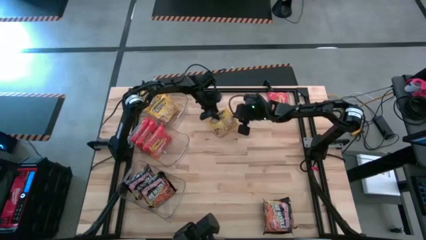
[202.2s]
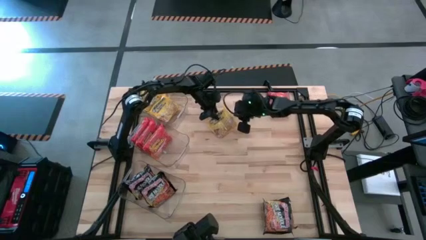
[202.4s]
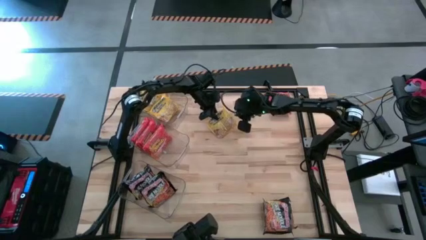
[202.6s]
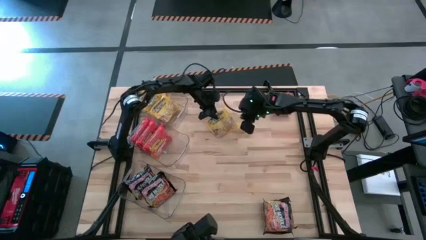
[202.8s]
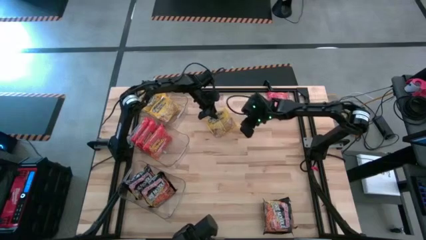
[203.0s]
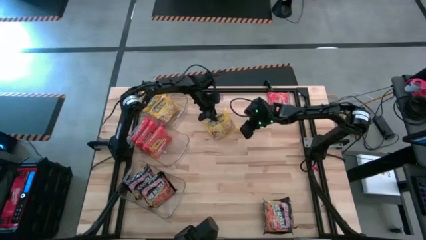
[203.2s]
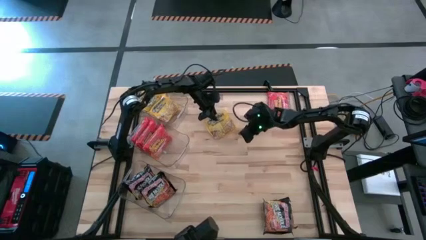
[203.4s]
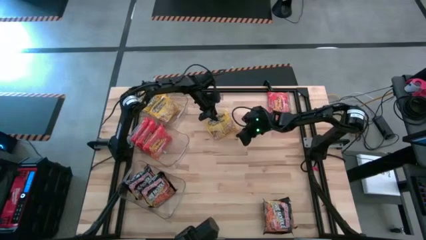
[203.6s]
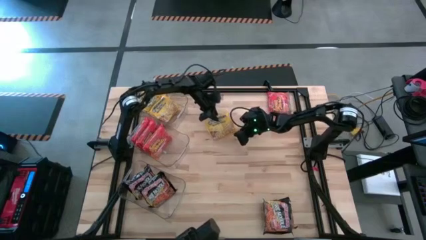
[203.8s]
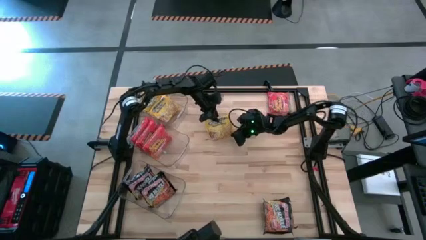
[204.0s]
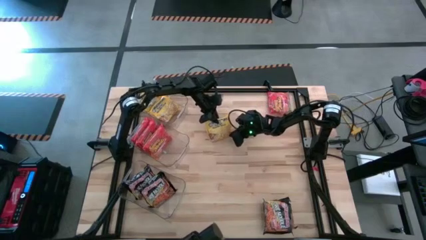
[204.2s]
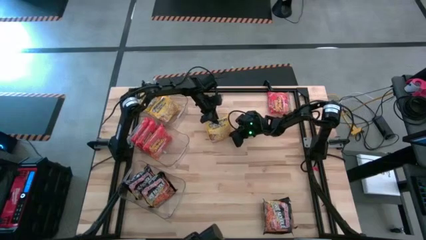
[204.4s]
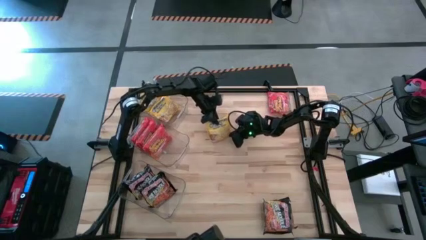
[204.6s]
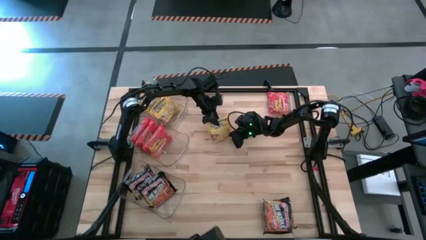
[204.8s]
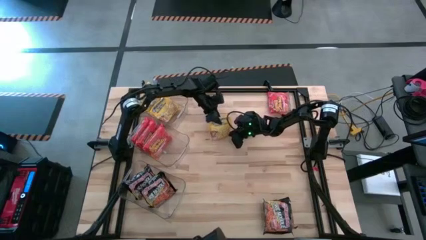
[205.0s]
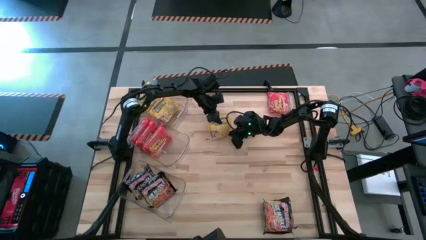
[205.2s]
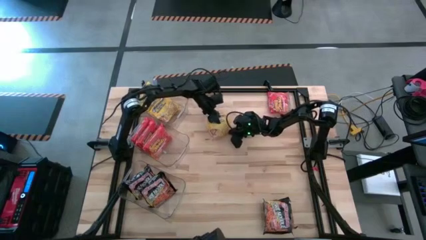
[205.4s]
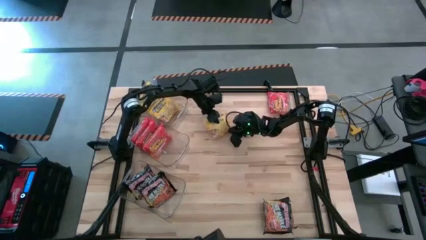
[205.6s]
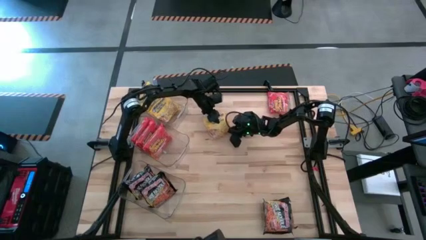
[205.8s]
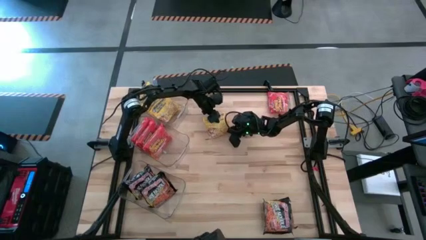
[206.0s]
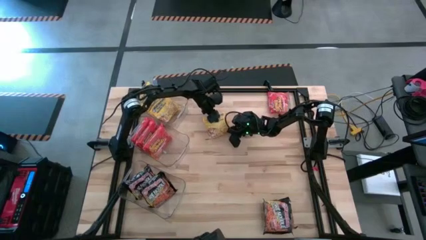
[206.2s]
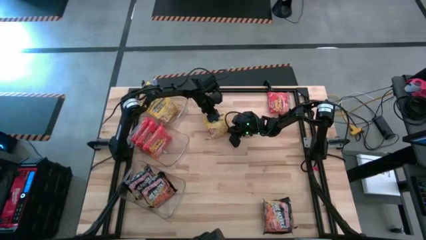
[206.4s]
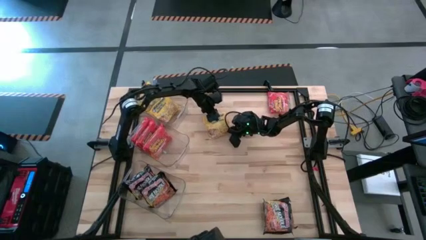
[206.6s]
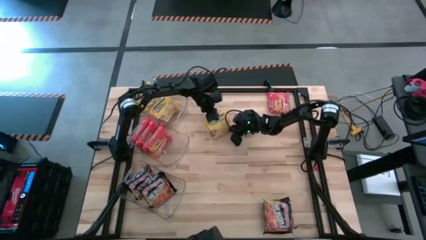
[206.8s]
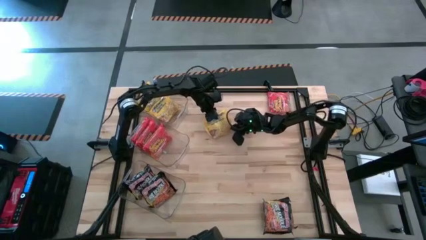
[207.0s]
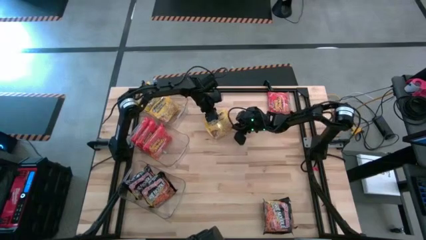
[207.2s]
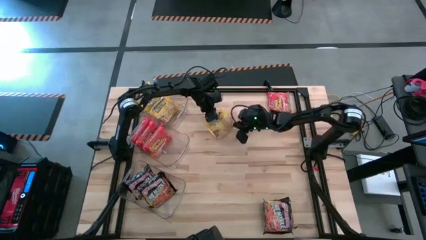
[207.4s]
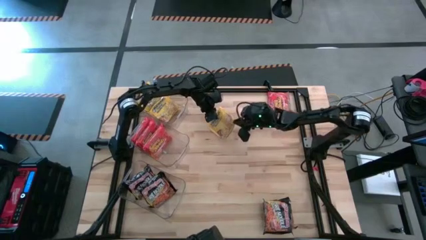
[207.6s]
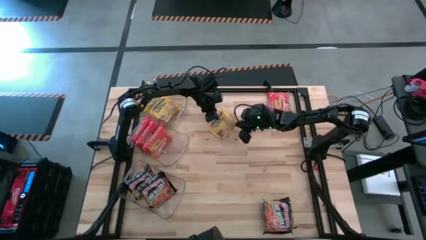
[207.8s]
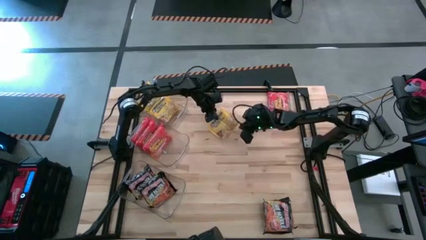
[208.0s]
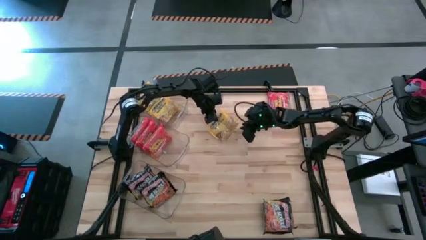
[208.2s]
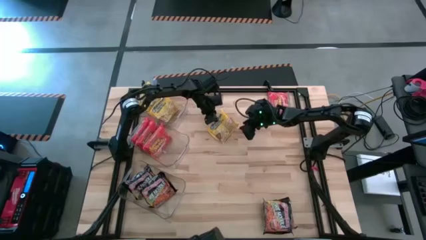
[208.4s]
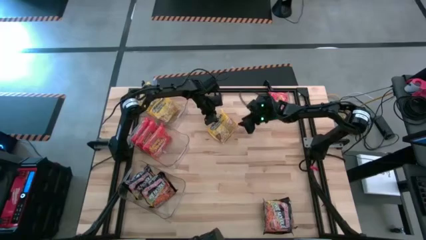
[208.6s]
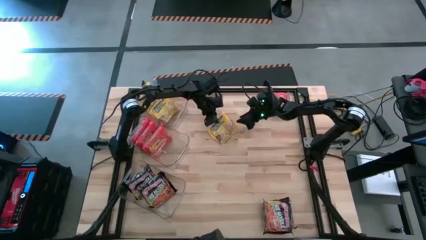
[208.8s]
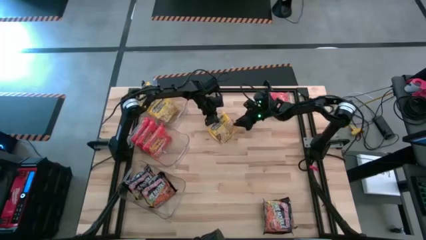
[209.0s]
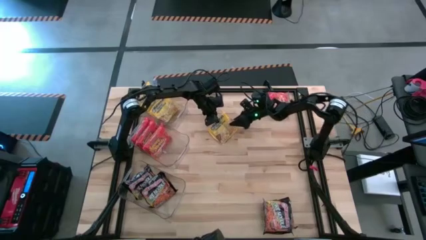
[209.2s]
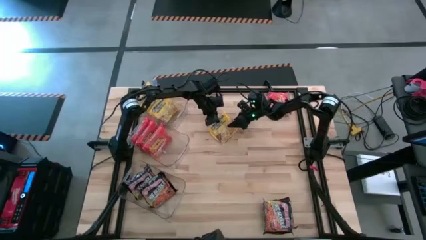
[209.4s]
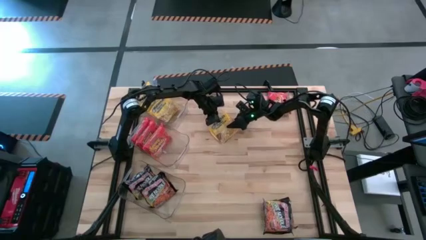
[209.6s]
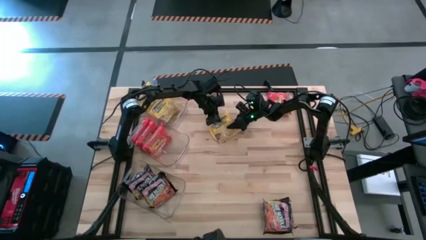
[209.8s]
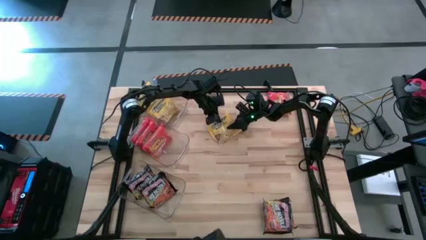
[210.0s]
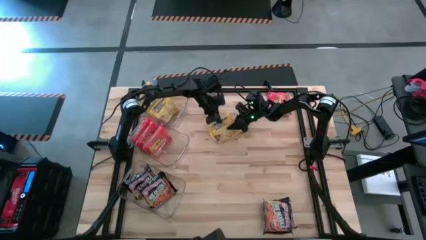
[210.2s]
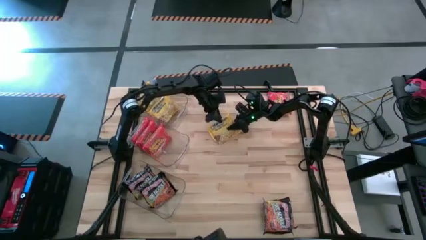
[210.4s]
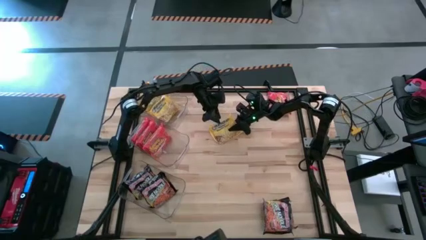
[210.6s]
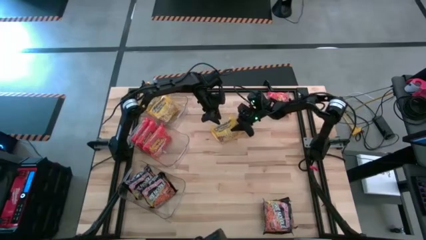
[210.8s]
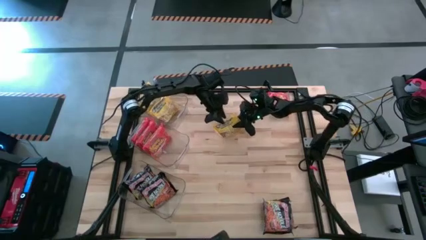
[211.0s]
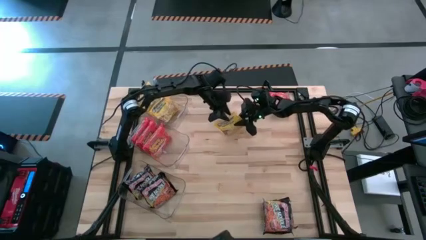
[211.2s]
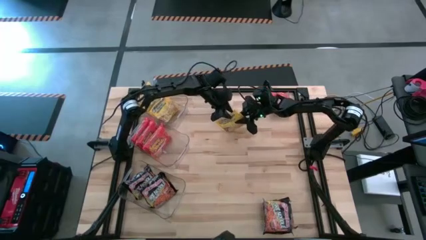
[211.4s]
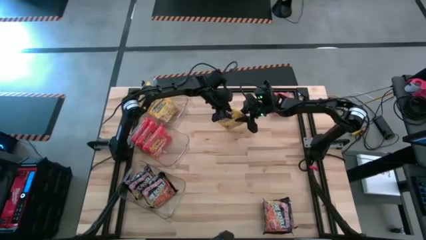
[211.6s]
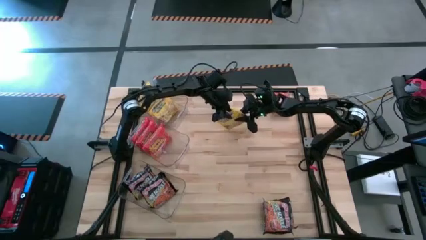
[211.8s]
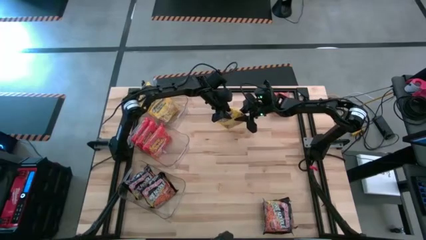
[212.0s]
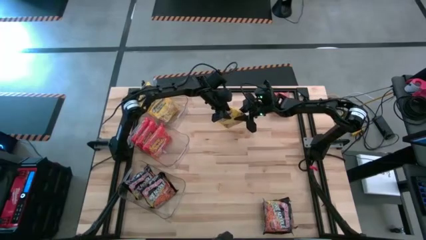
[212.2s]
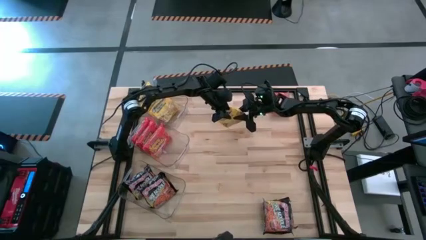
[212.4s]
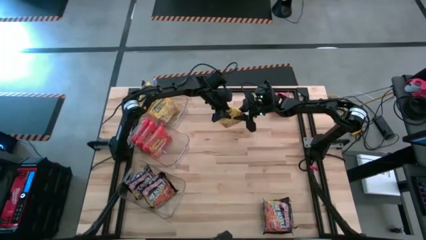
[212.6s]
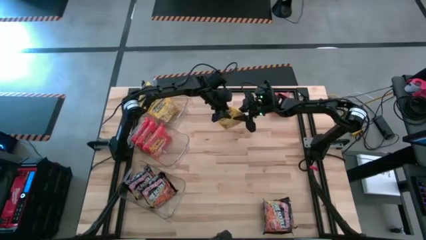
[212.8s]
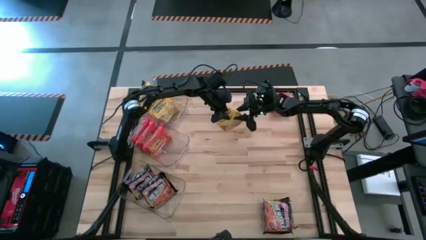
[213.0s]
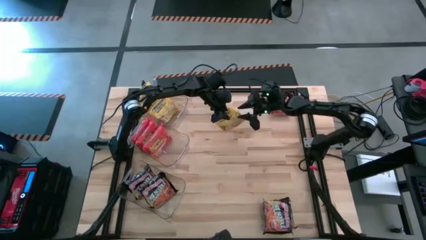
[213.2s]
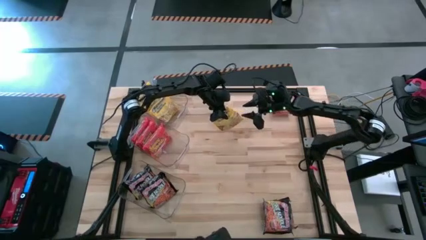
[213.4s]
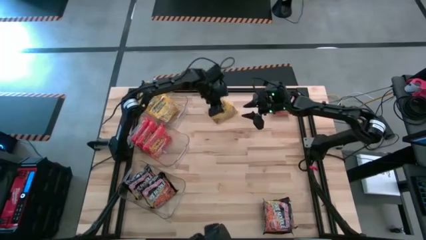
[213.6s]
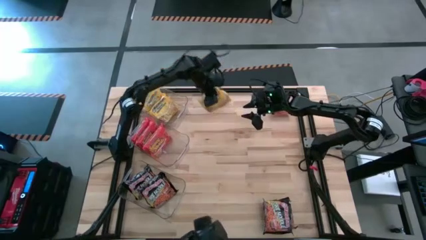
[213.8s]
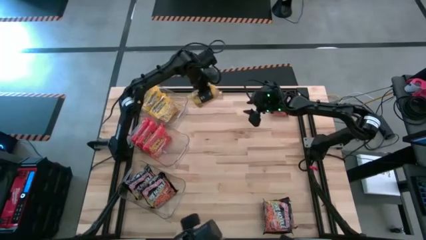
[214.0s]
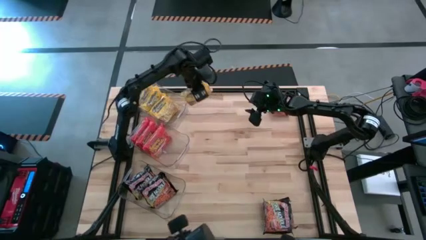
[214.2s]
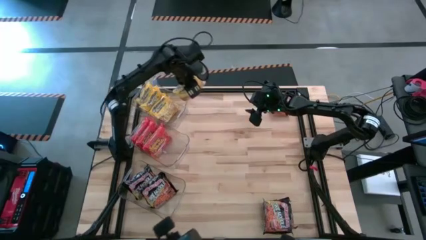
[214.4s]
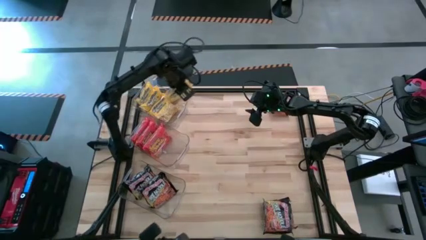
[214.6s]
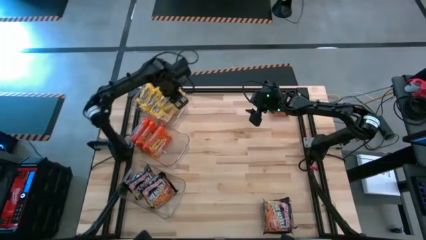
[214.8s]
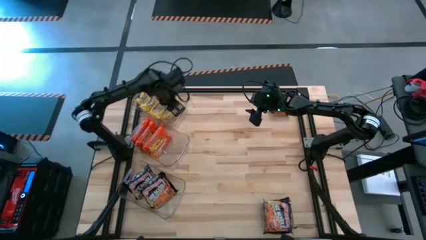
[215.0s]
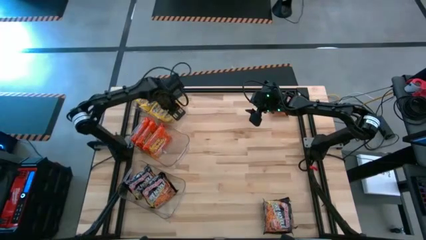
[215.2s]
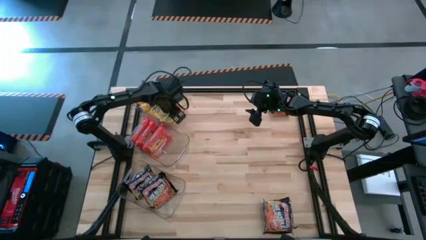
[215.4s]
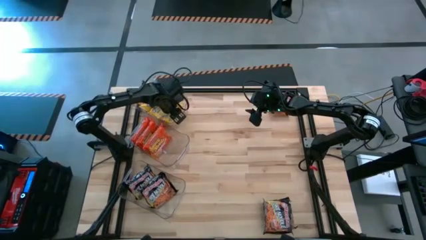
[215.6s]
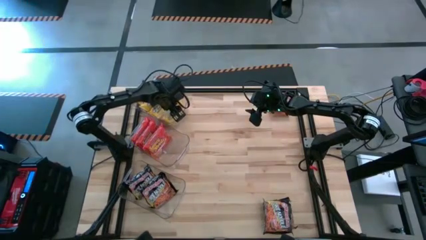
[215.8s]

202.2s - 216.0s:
Task: Sort Maruchan noodles
Put the yellow noodles pack into the top transparent bin
